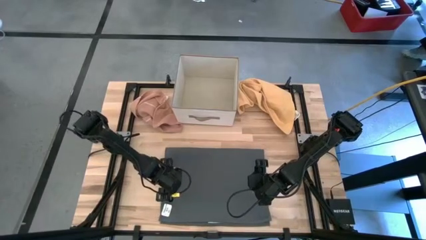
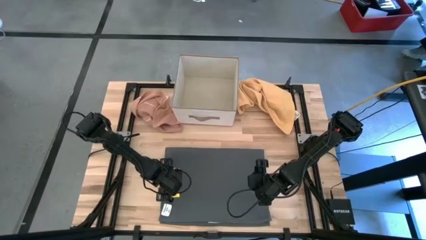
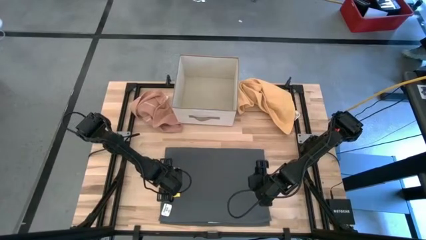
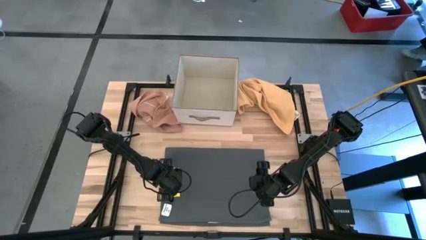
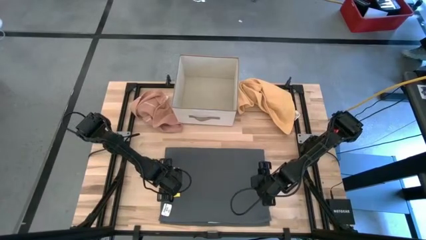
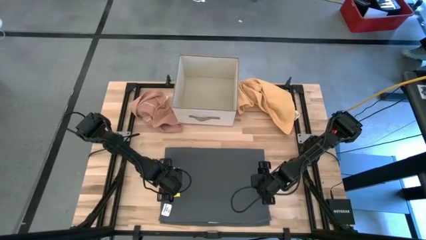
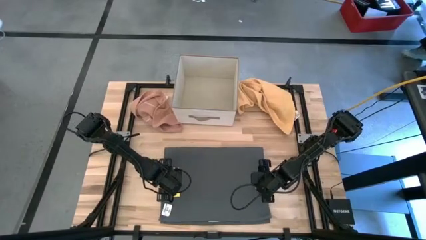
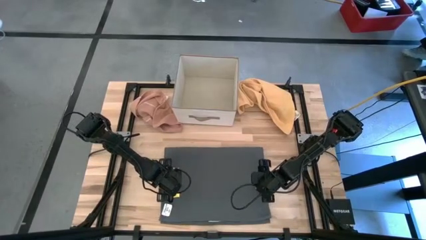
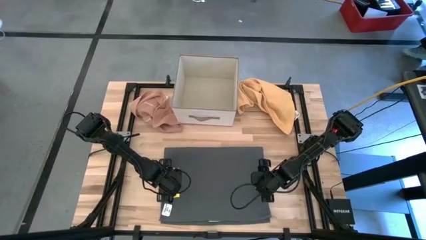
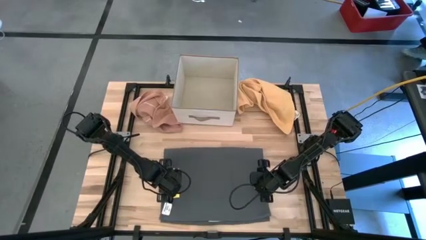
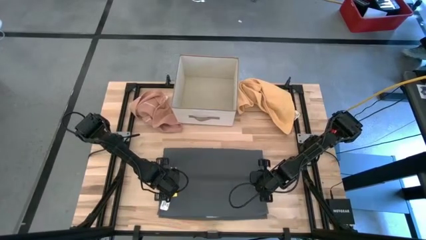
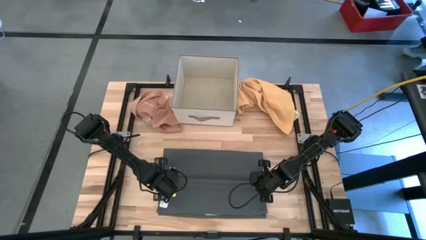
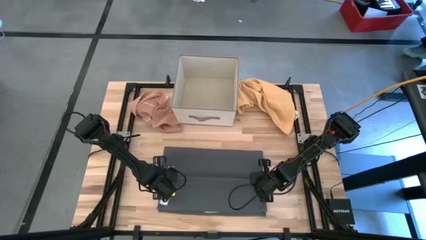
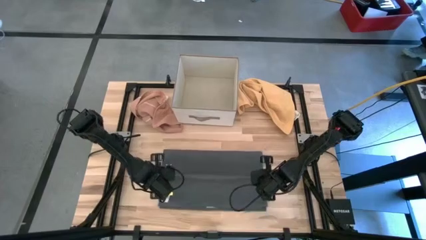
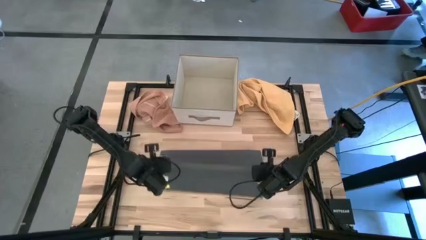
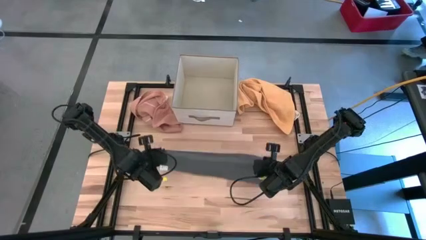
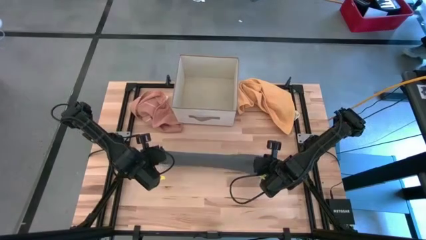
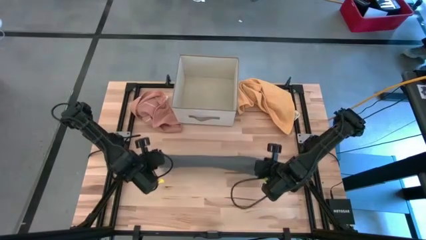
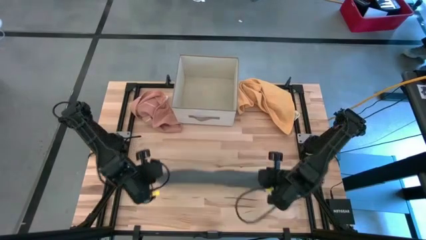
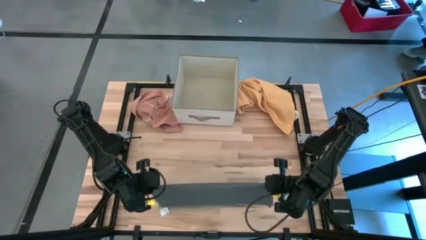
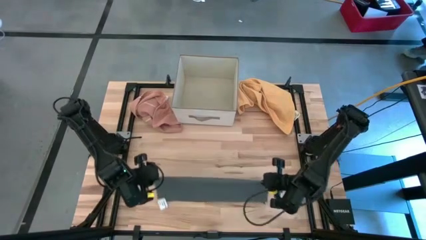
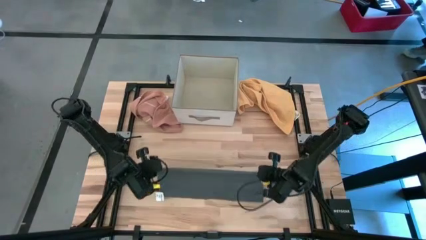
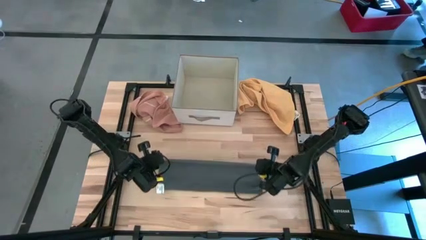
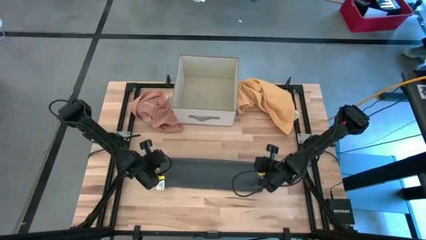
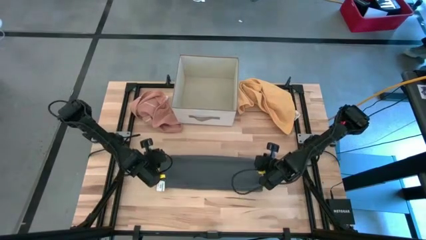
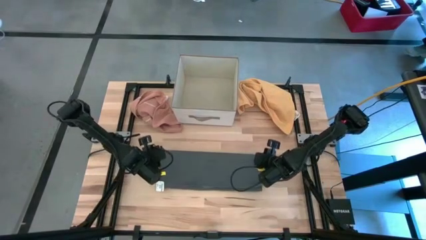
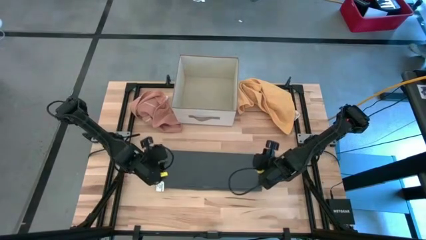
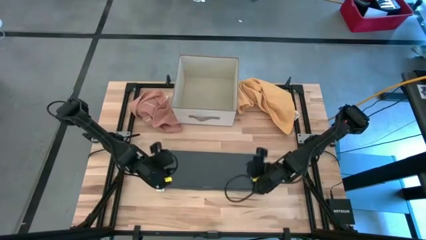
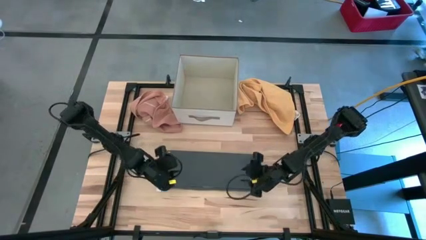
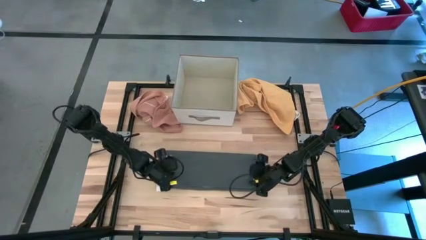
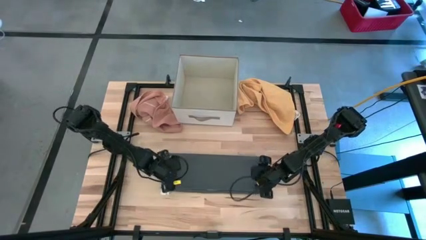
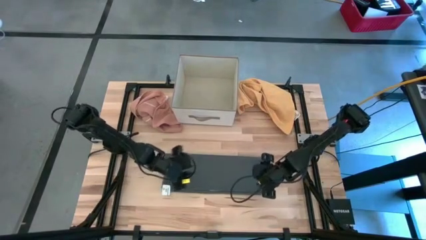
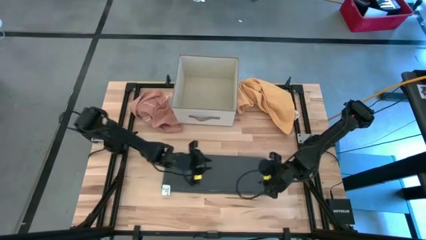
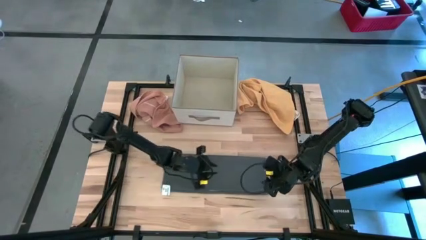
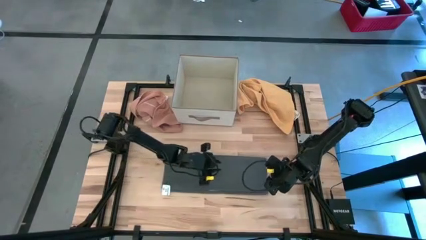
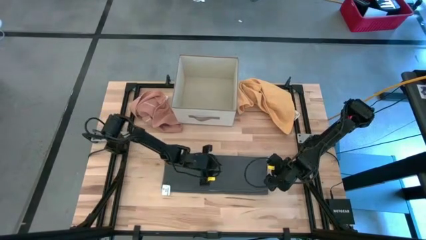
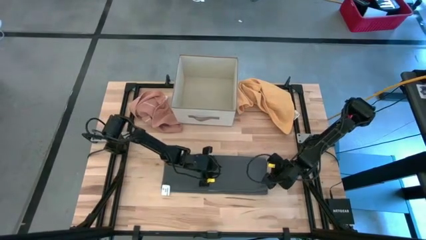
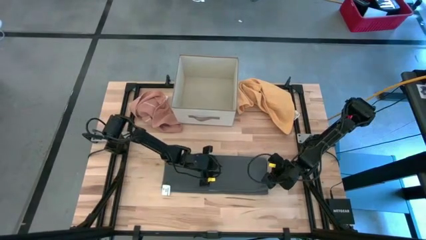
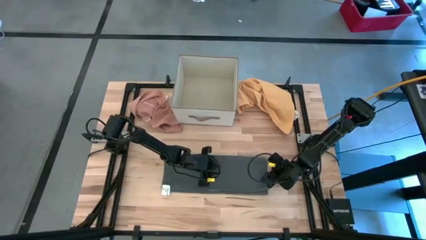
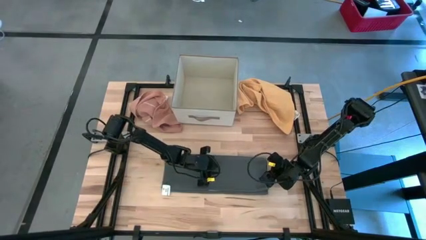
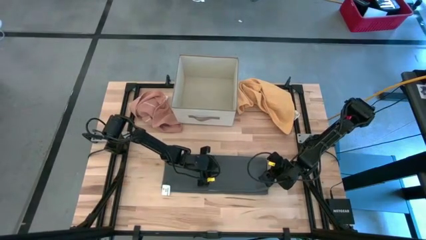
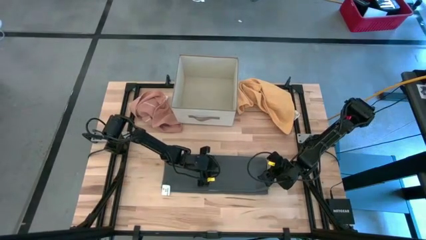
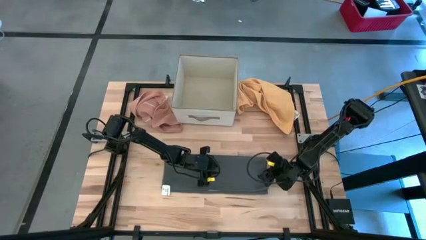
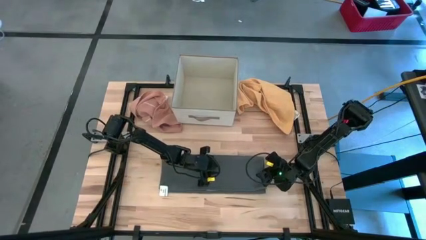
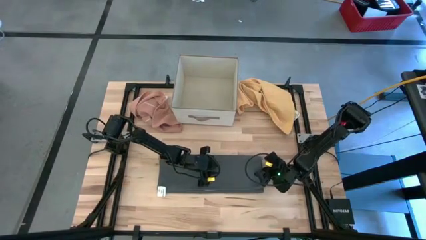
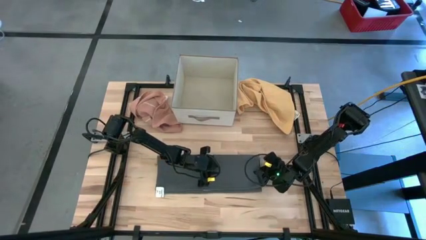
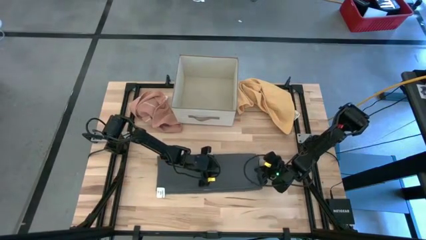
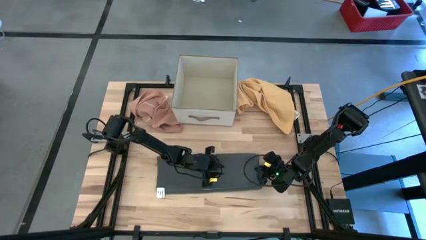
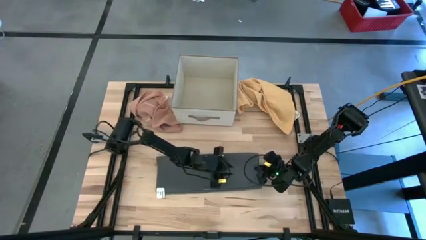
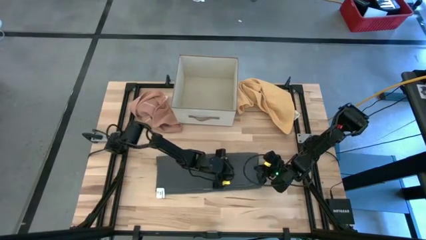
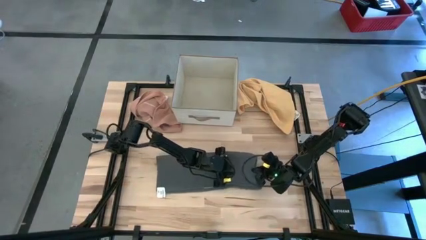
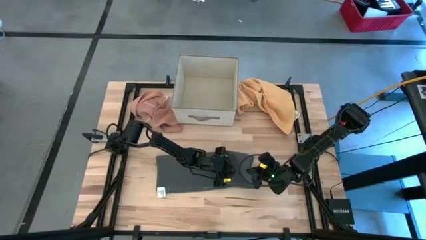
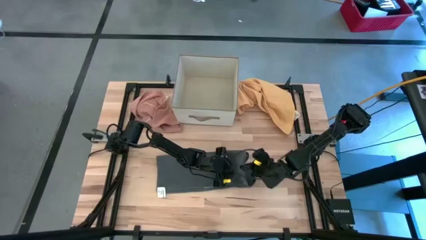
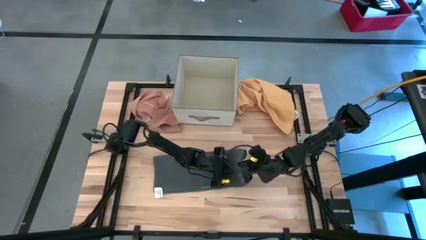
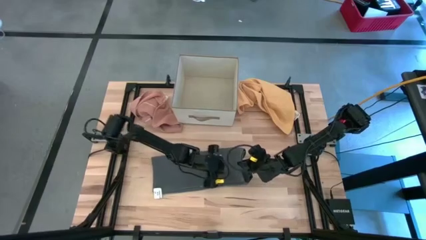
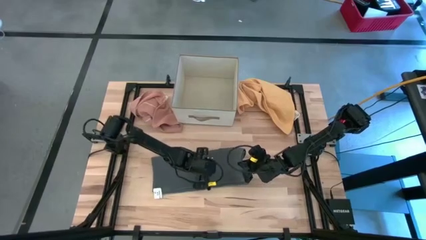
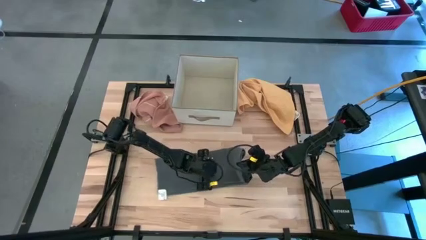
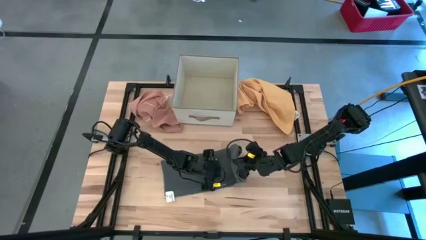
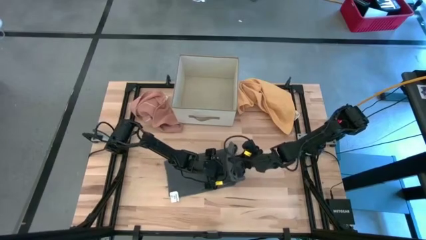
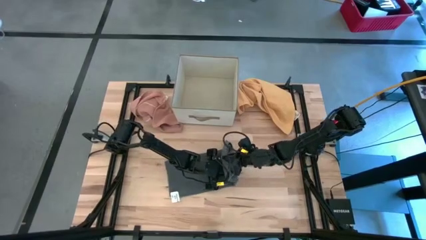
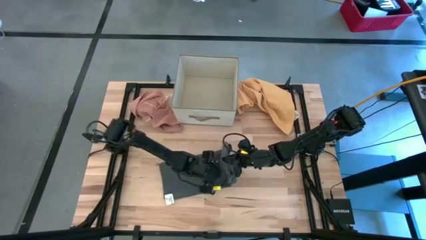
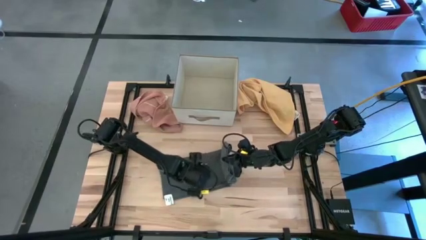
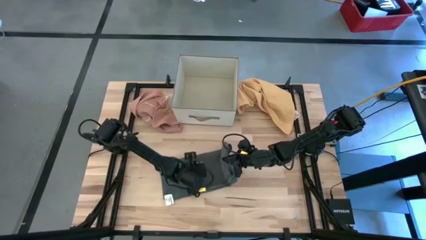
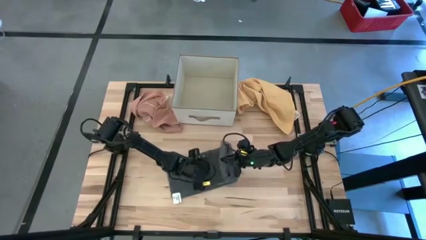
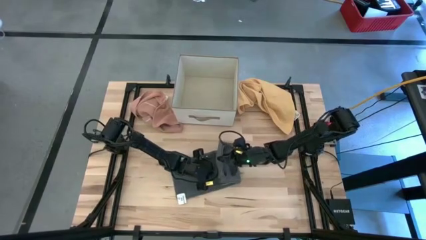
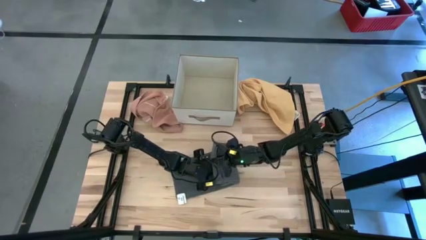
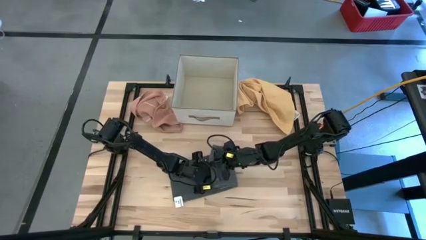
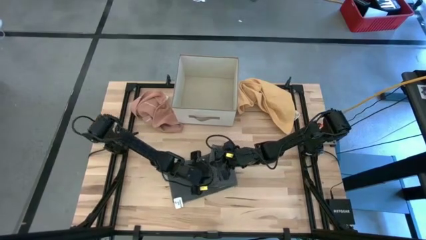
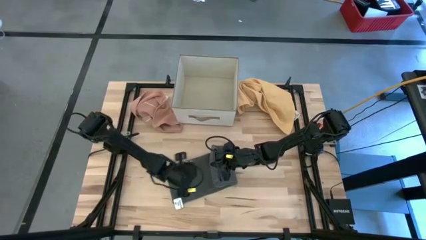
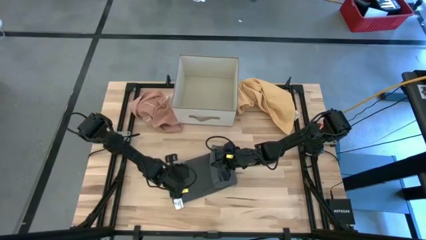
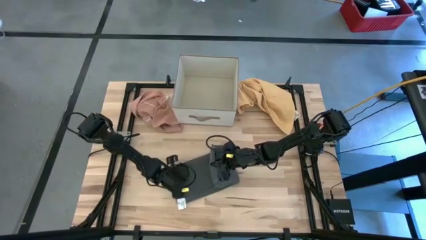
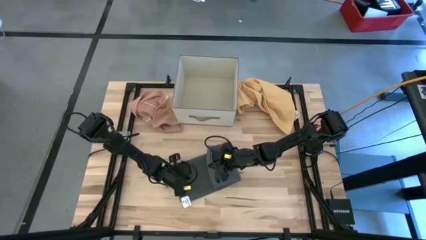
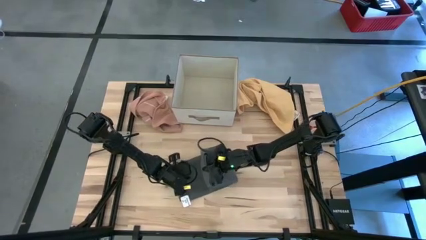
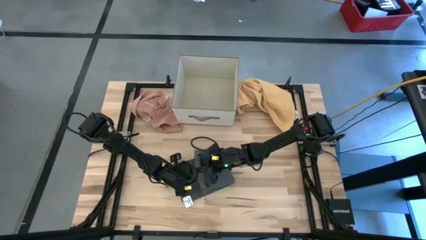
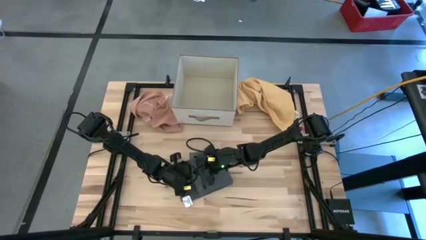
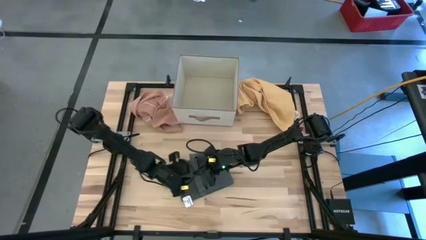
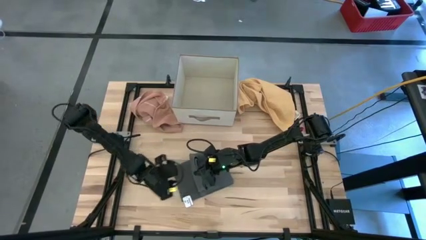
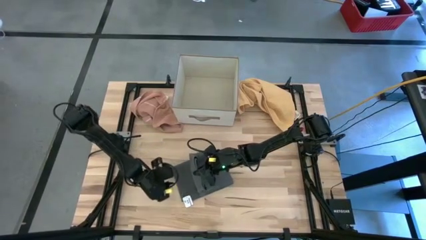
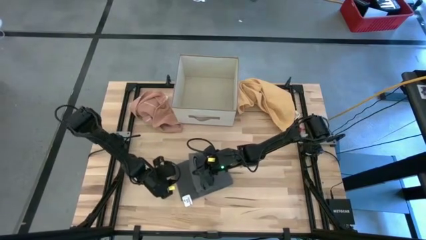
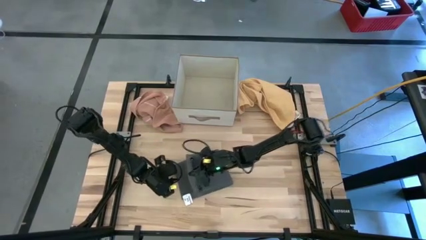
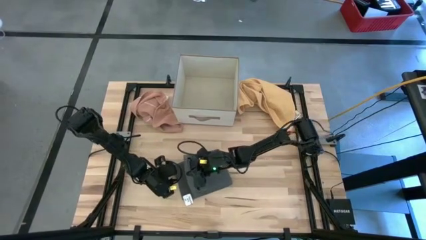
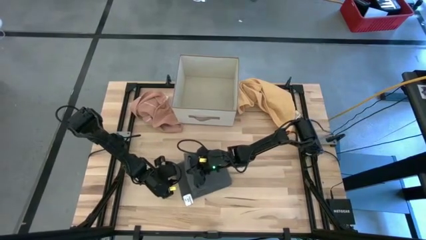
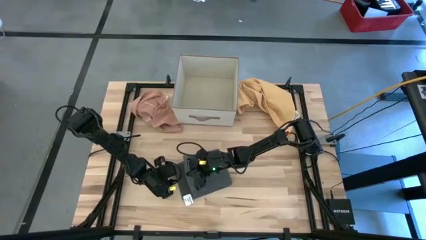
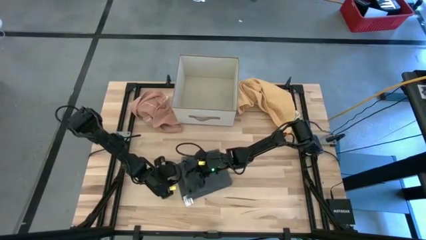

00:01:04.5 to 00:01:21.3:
Task: Fold towel
Fold the dark gray towel
